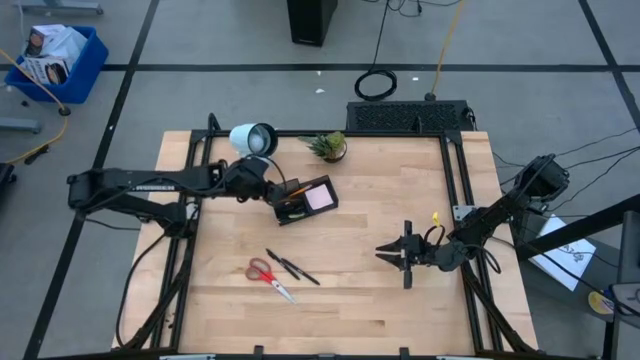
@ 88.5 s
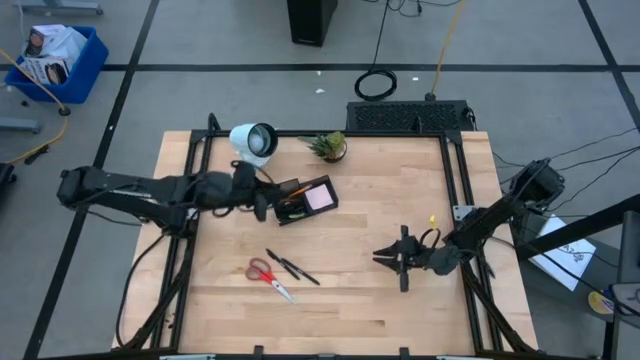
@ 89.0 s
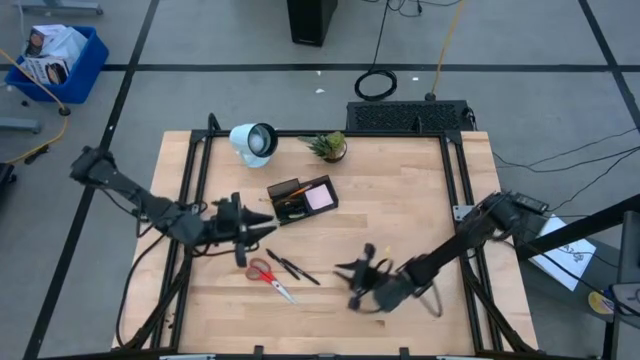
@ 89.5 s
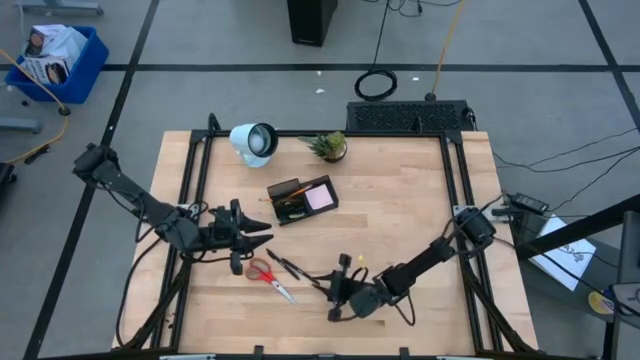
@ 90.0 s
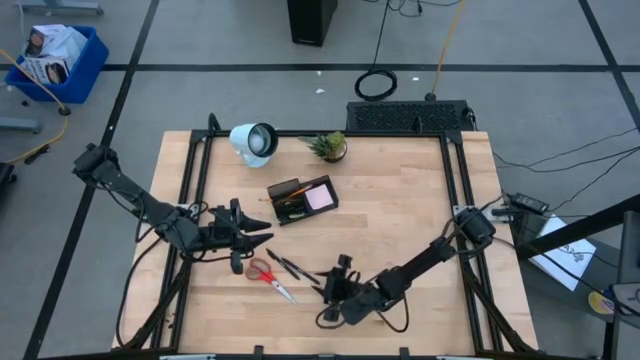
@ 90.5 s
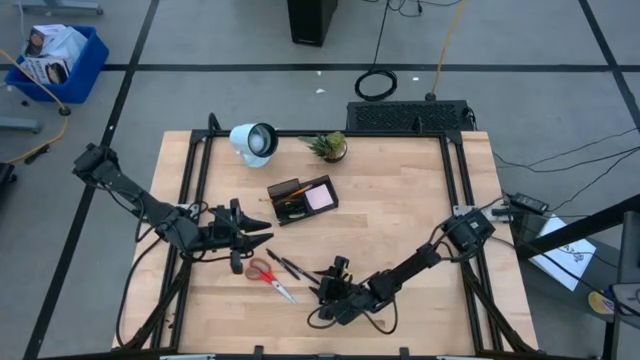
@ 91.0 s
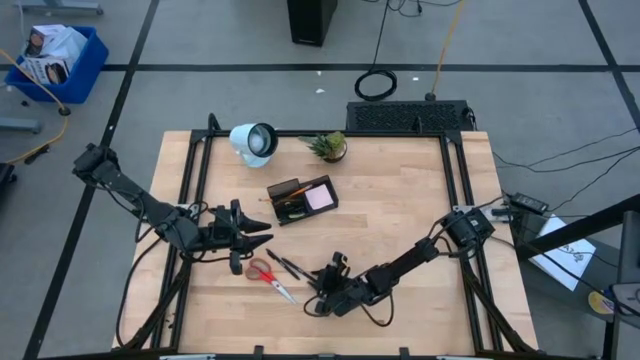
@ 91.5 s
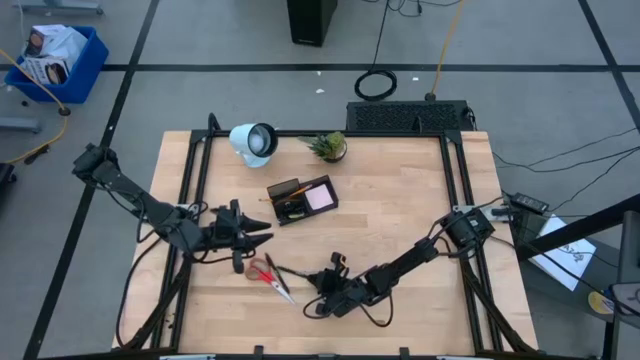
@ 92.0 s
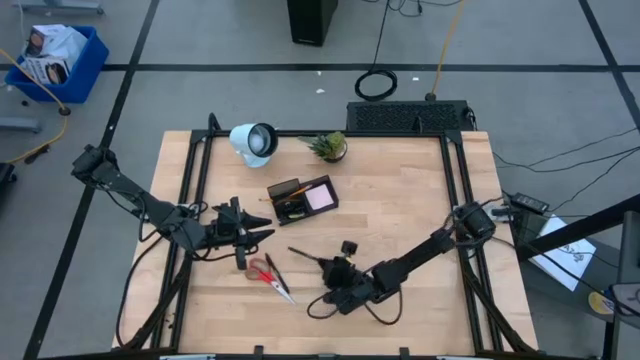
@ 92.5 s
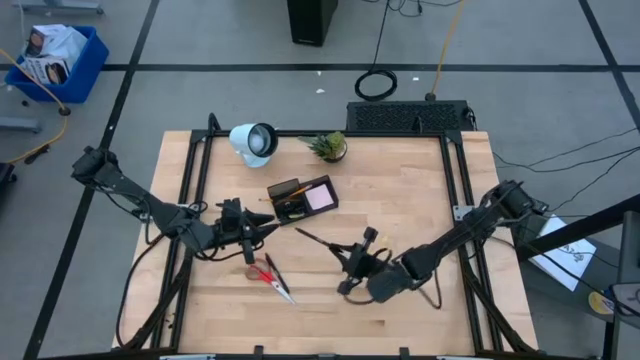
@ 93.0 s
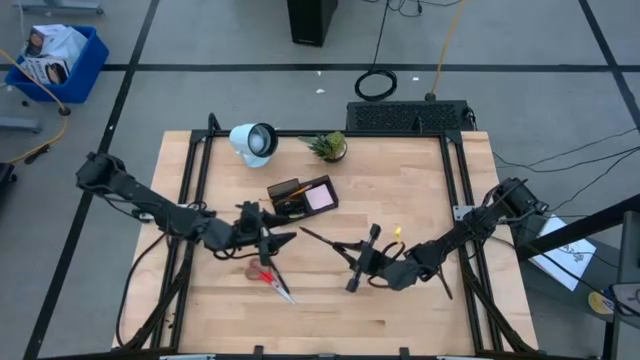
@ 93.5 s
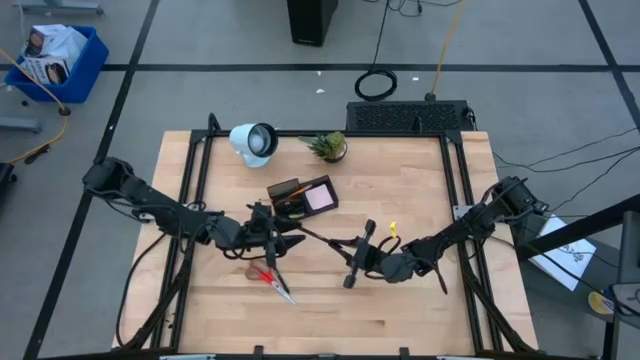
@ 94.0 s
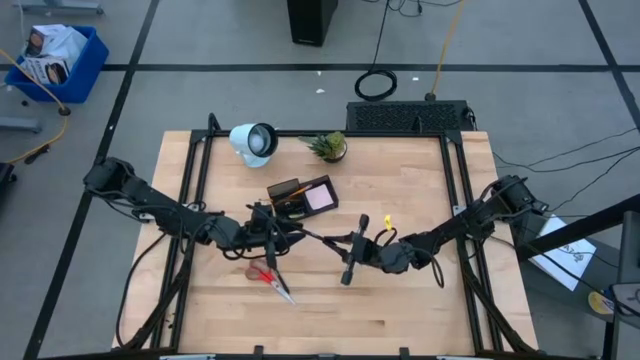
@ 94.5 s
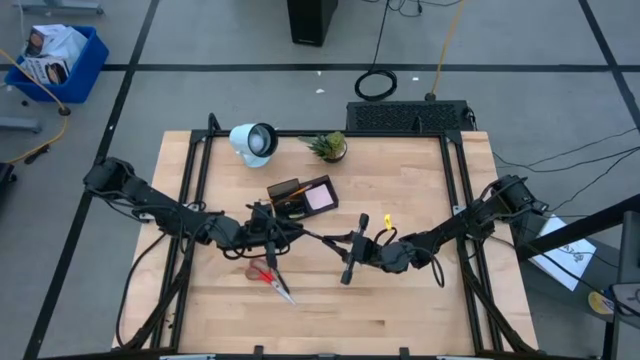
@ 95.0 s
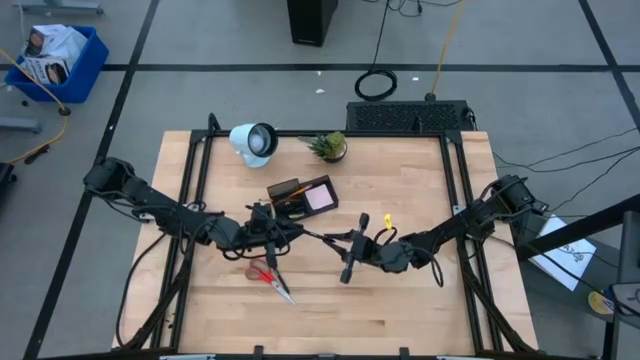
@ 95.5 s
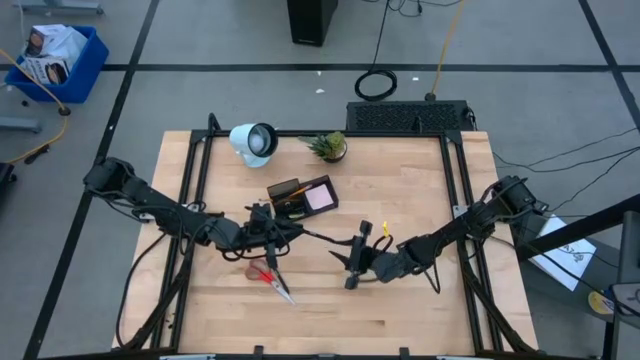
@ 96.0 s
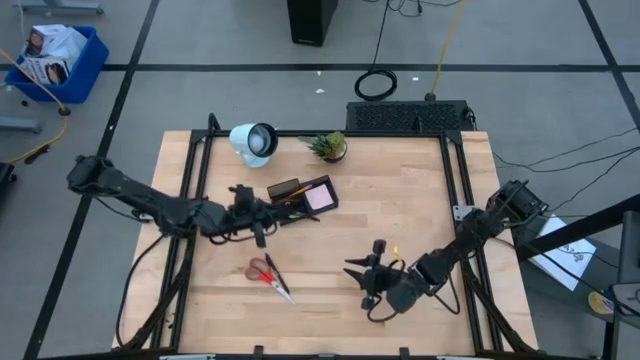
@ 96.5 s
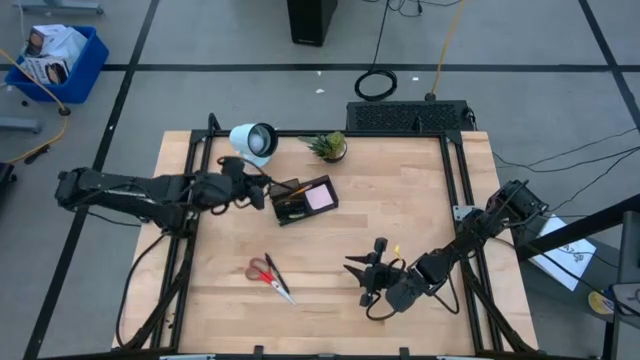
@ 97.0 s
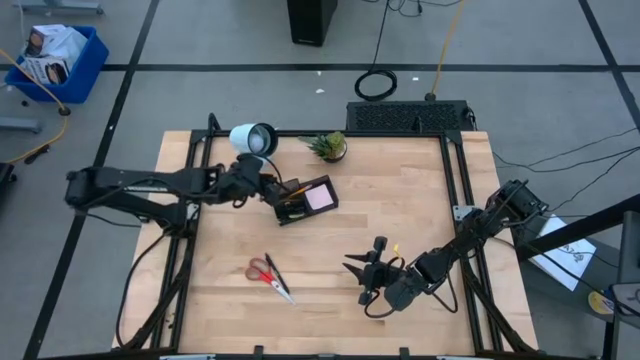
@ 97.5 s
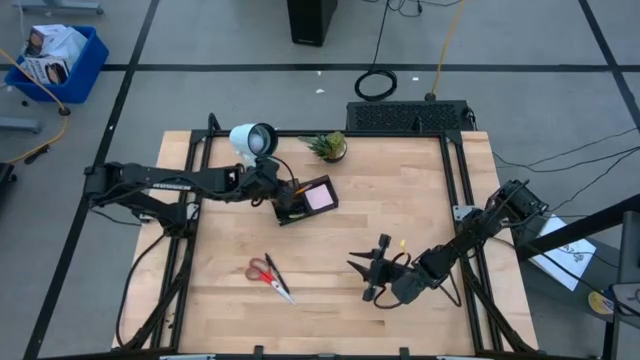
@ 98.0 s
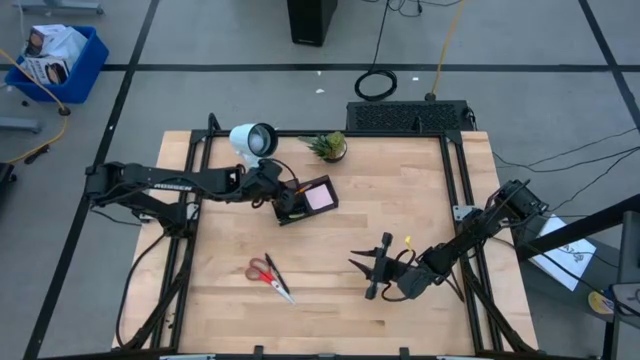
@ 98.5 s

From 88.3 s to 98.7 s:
Task: Pick and place office supplies into organizer
Put the black pen into the black desk organizer

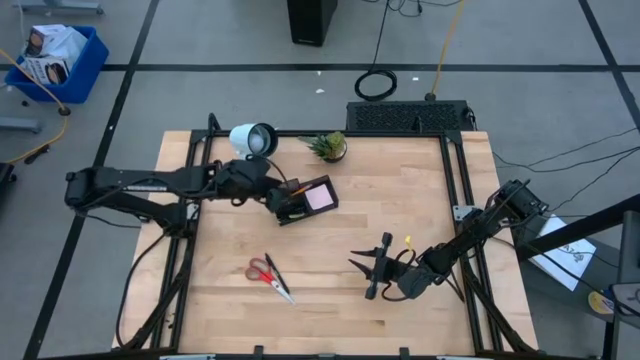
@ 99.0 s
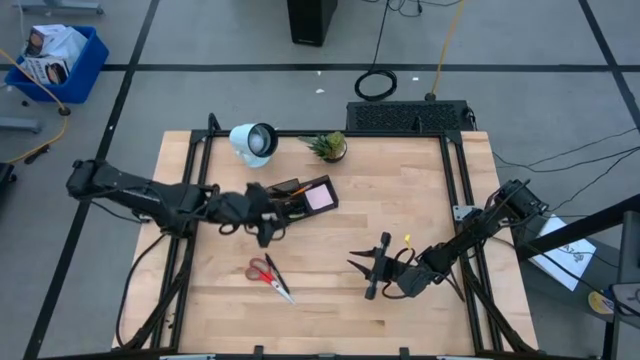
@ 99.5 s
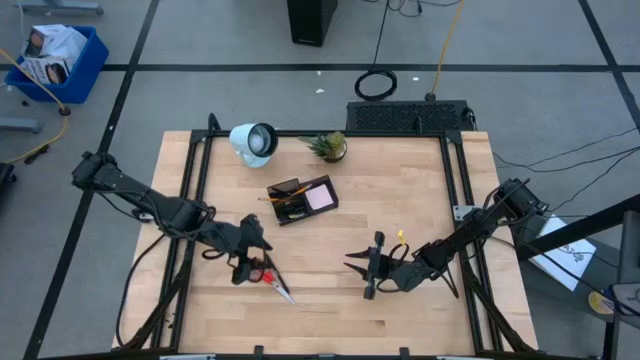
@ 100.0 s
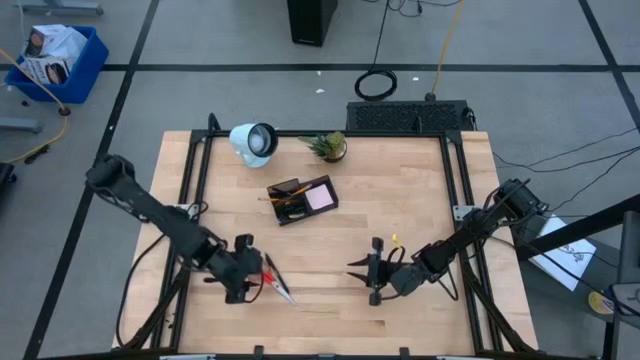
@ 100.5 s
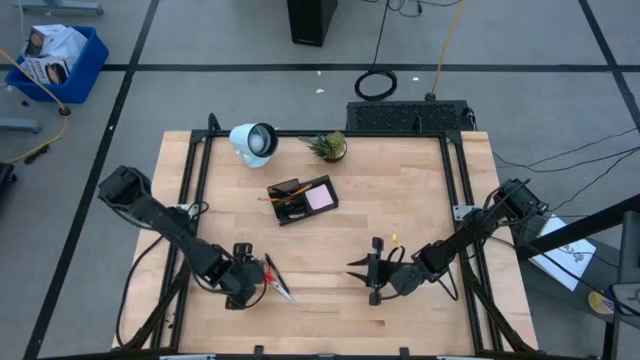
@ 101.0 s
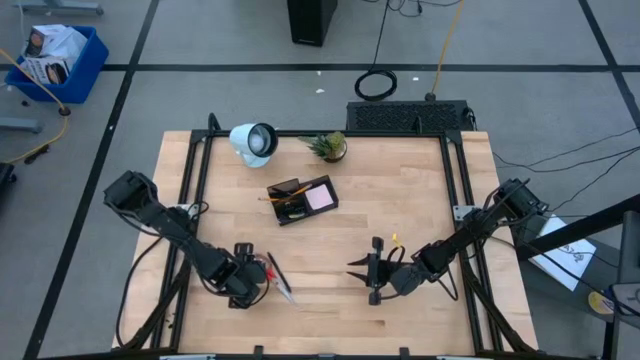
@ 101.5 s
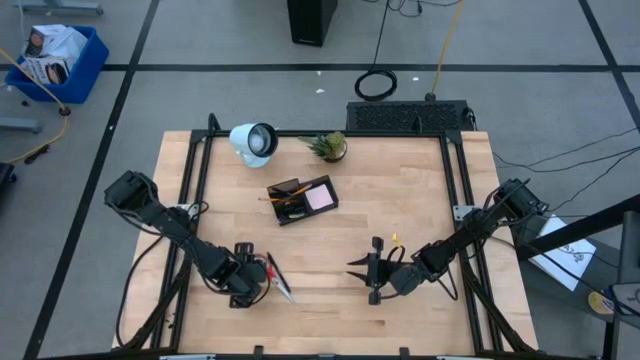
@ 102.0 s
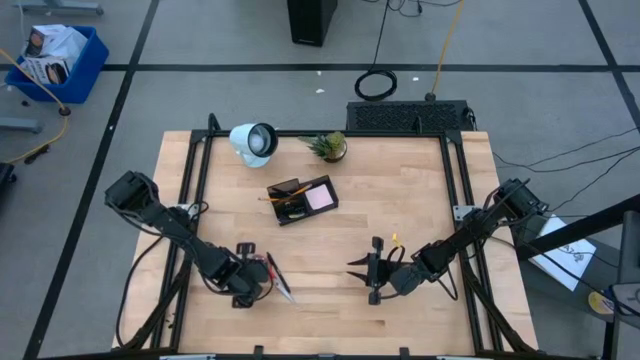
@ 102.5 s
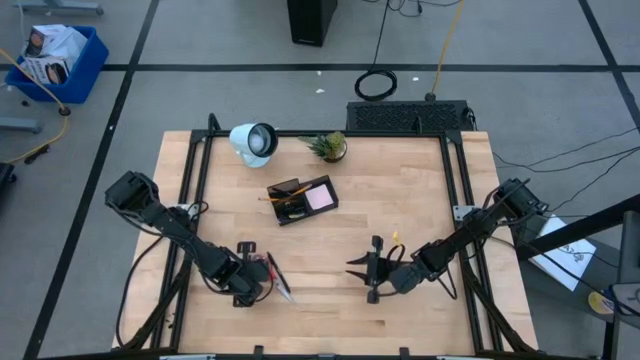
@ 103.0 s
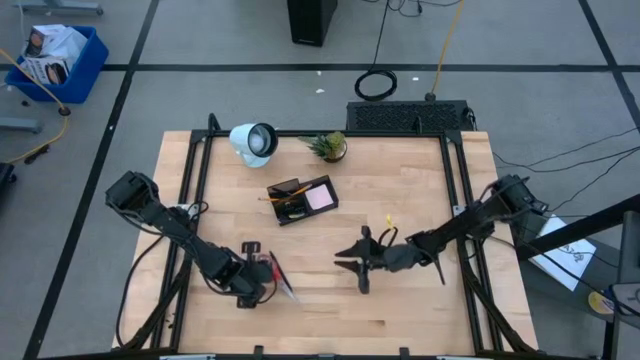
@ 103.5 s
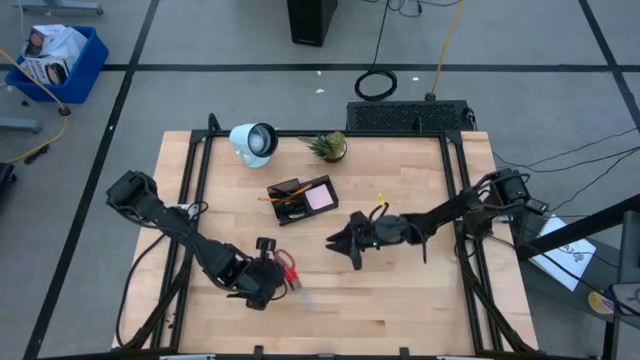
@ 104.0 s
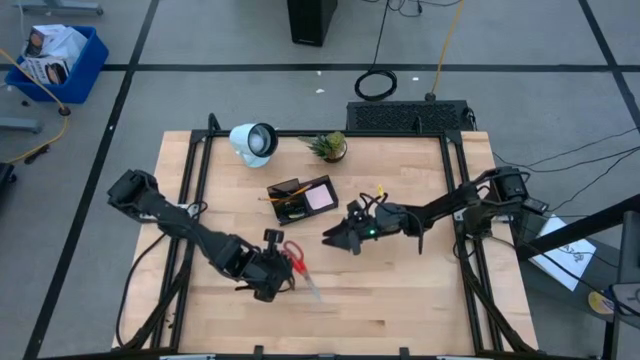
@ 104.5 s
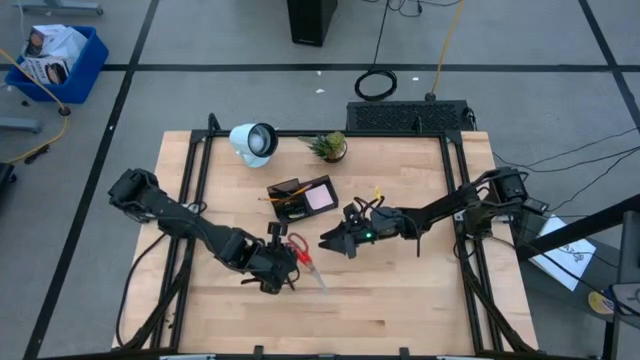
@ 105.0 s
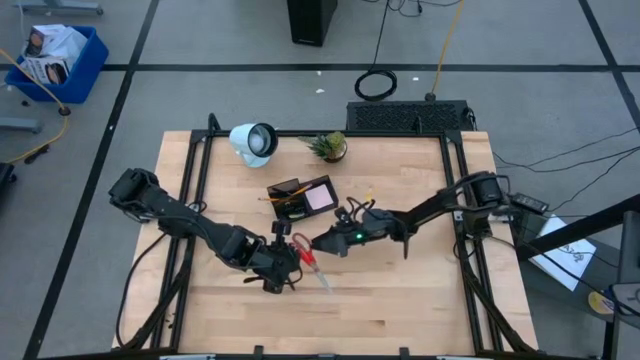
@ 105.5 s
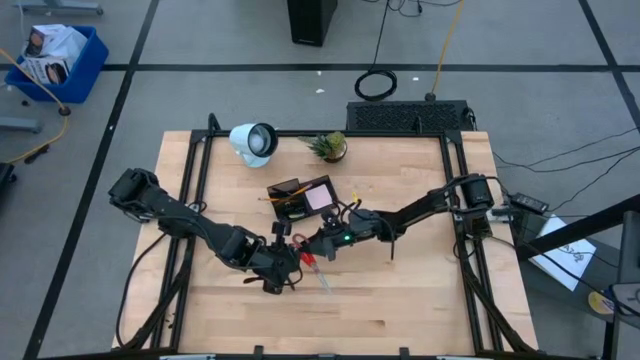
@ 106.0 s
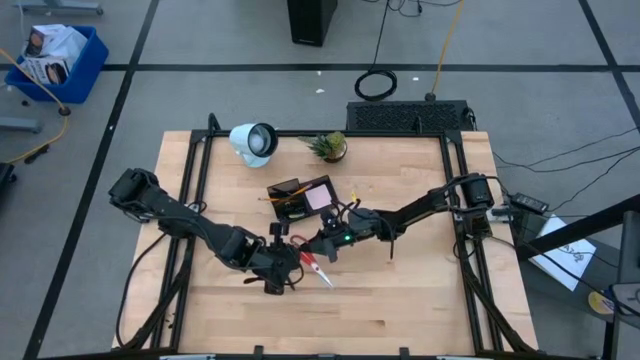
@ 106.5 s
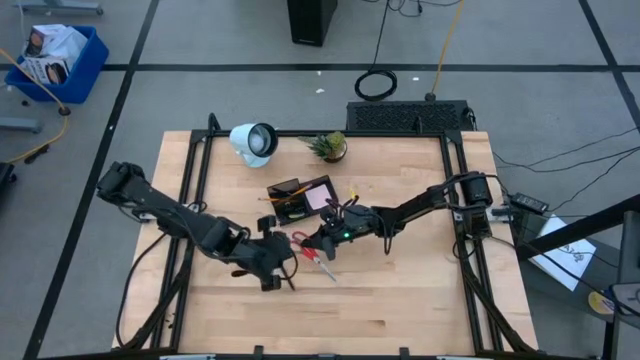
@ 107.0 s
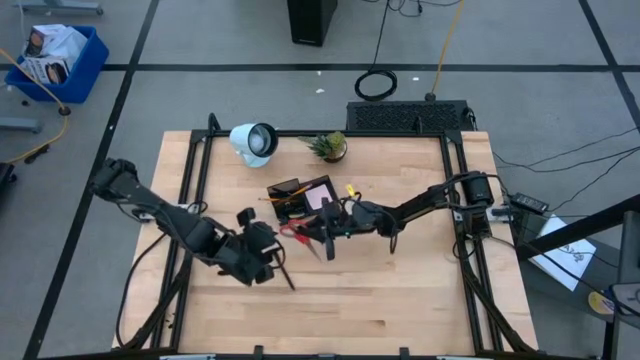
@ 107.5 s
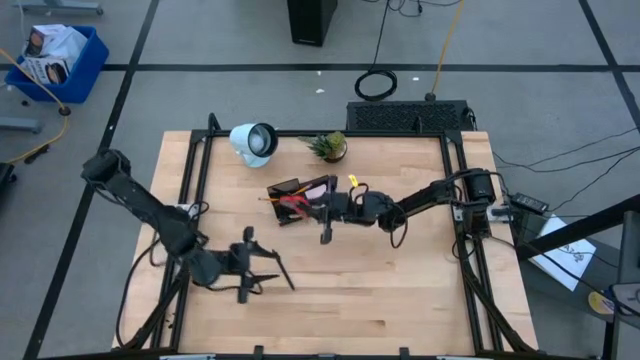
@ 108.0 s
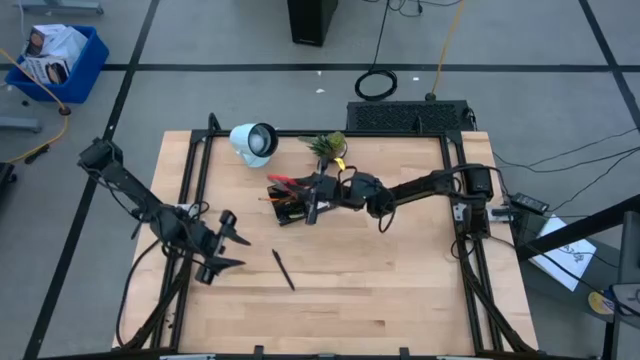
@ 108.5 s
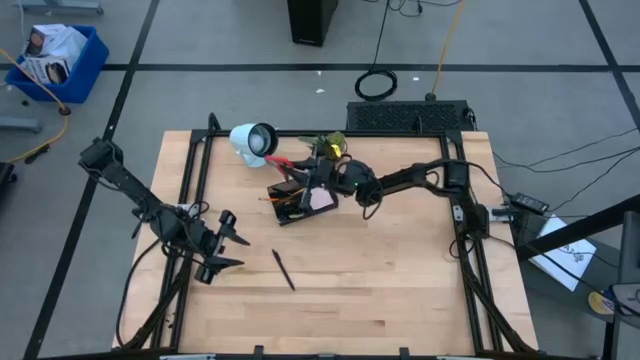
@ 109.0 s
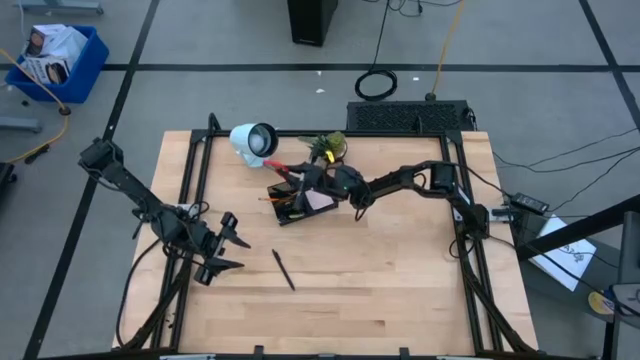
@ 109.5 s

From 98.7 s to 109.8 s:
Put the red scissors into the black desk organizer
